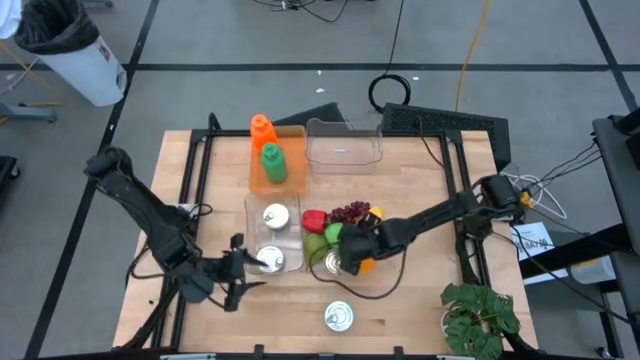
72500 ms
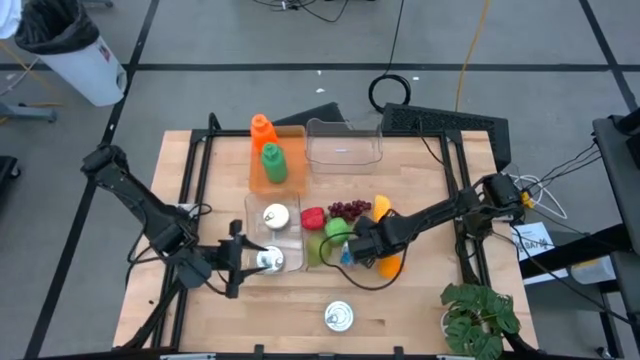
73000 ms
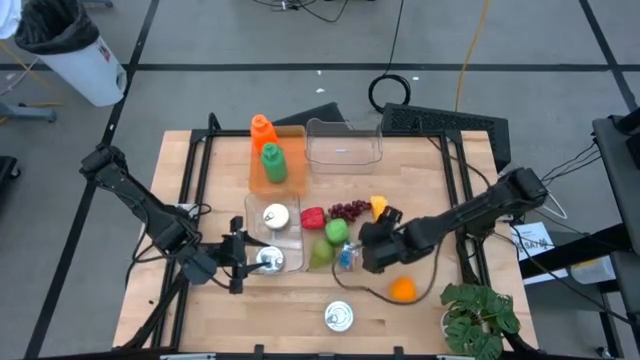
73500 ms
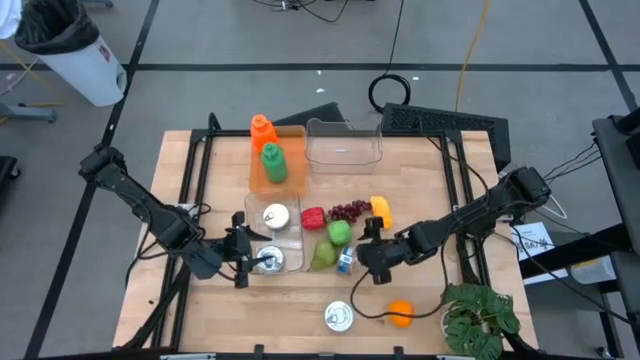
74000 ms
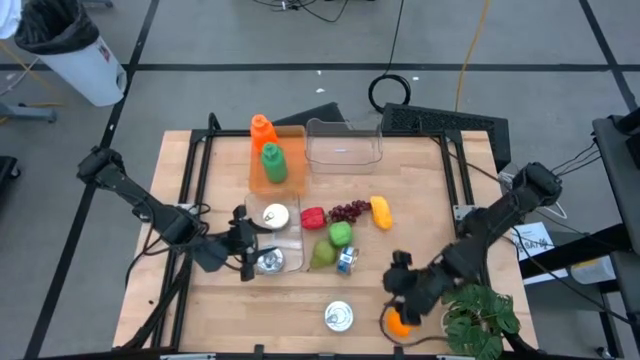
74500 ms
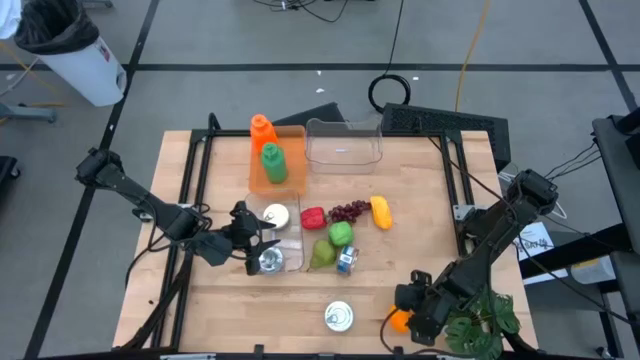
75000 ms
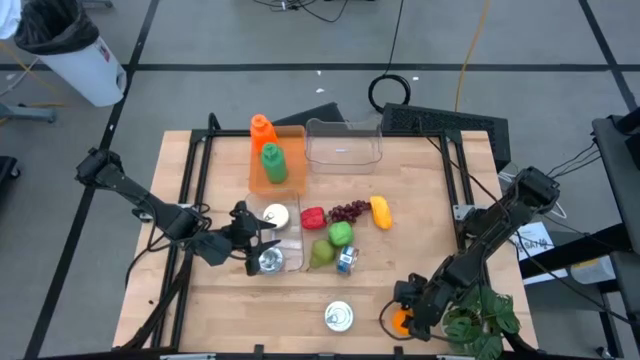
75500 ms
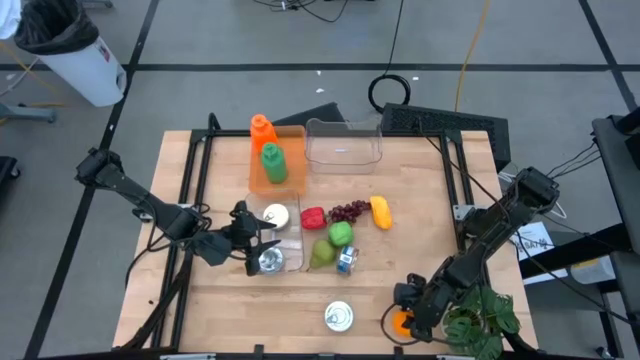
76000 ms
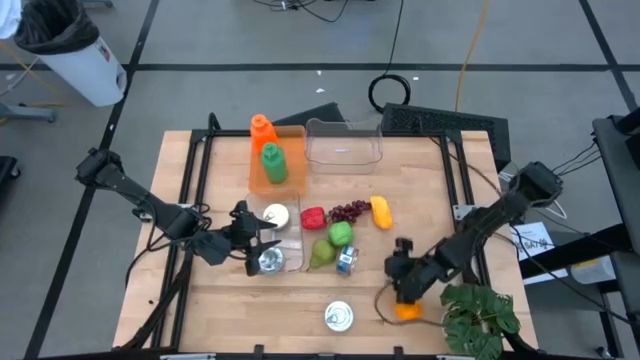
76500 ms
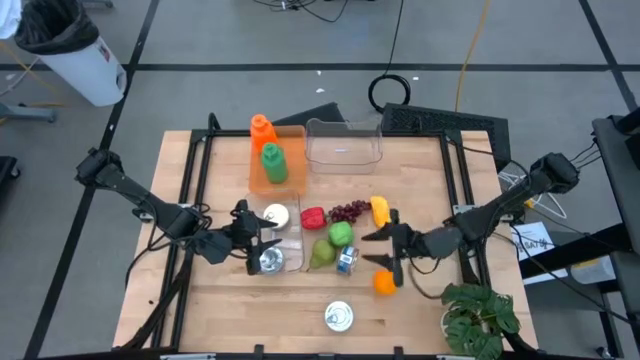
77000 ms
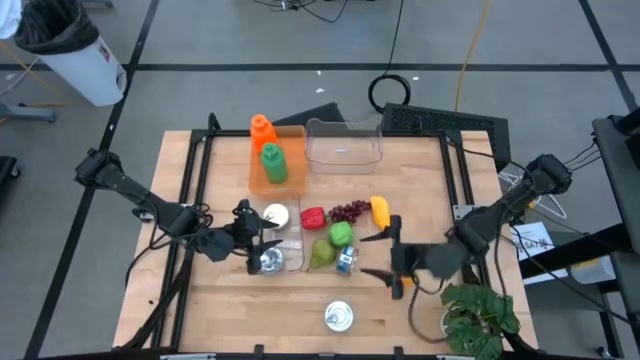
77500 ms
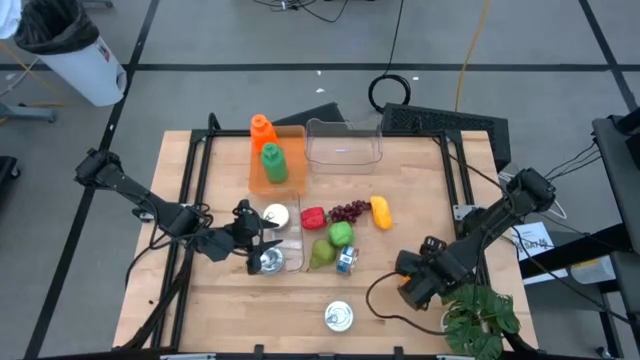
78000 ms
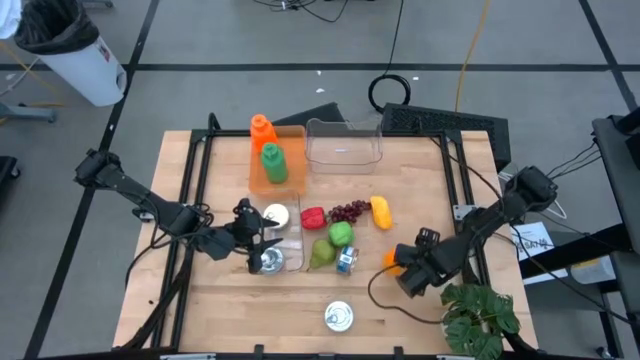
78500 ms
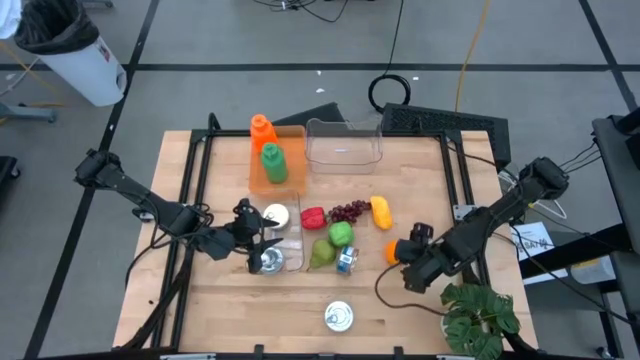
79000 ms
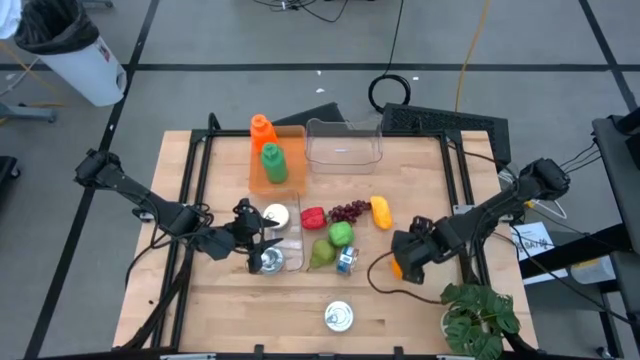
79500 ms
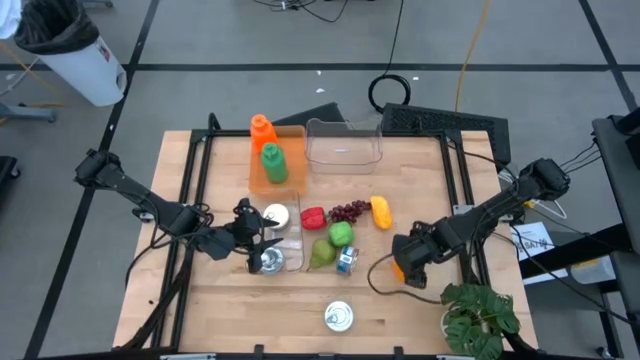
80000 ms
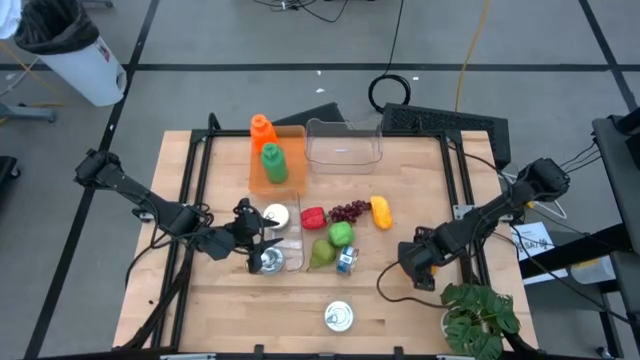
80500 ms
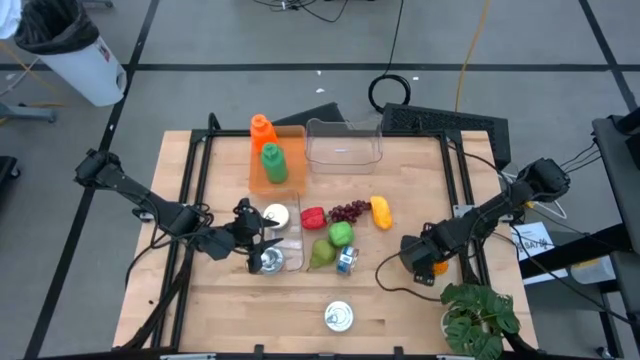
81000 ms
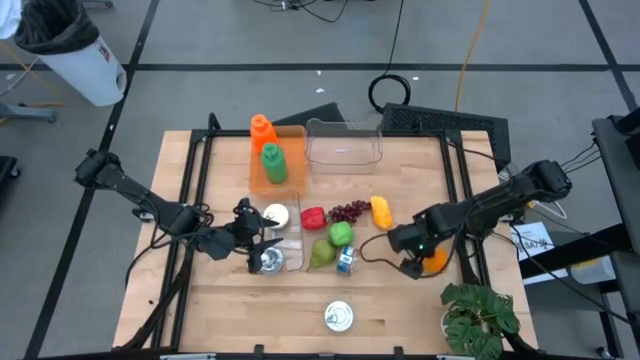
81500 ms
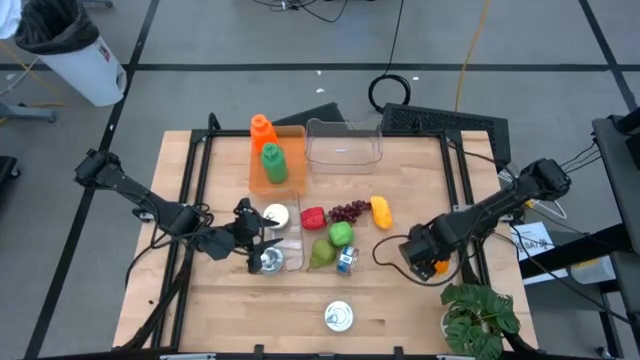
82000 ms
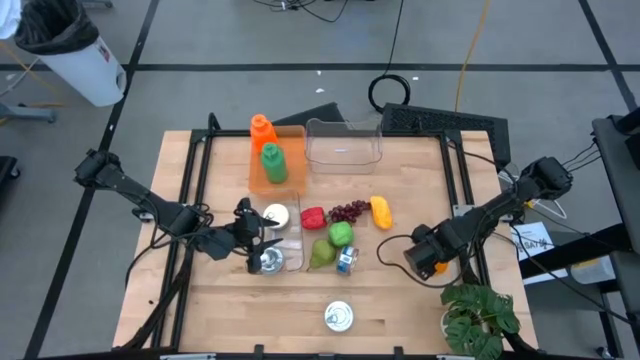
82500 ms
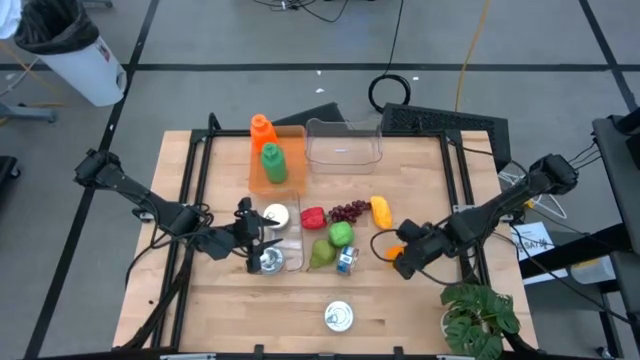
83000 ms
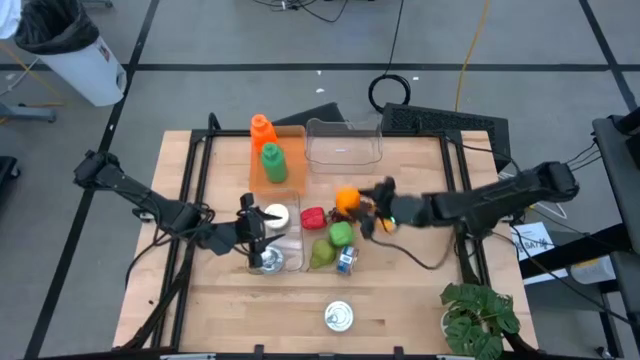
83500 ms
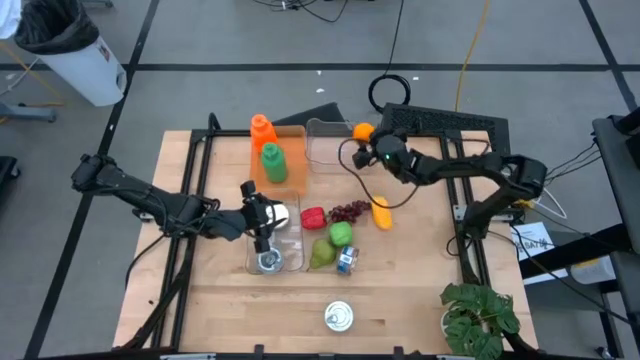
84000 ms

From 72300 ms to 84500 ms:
Task: Pick & Place Food Item
Put the orange into the top transparent bin

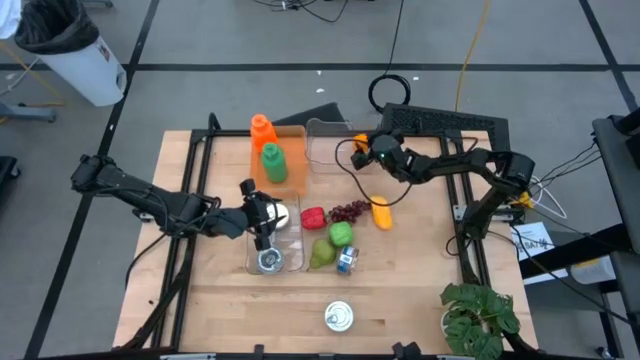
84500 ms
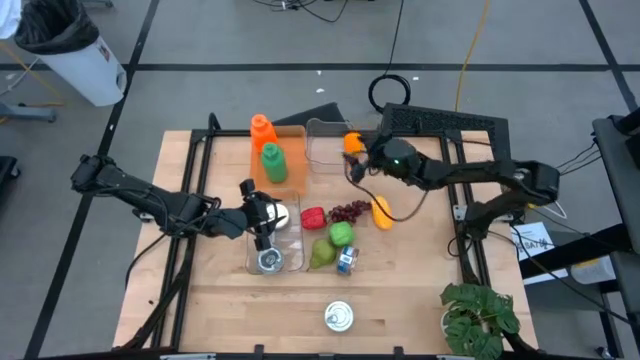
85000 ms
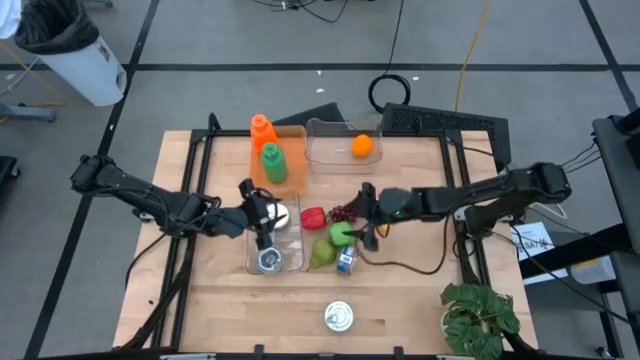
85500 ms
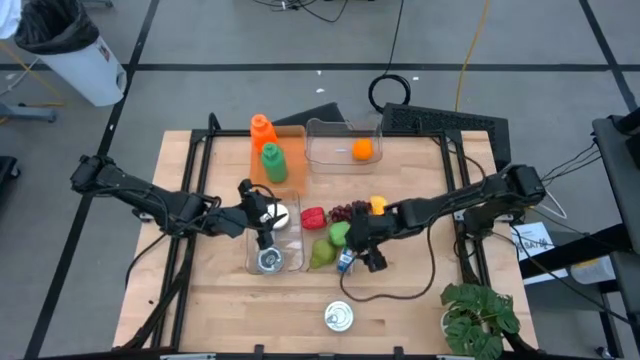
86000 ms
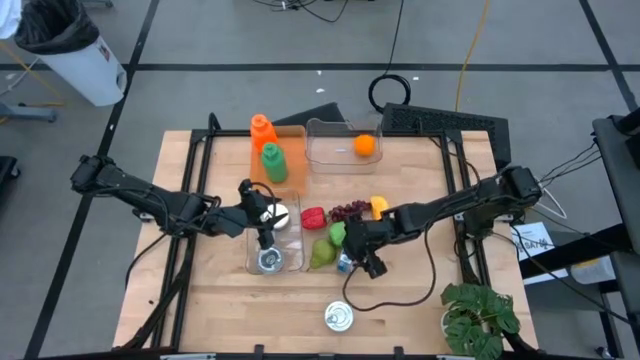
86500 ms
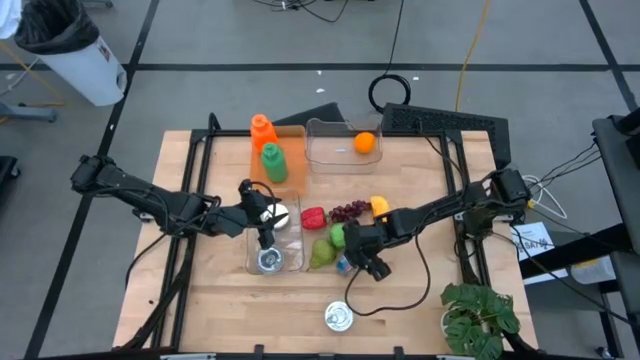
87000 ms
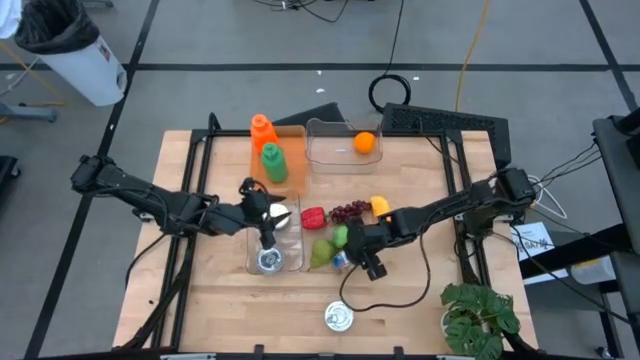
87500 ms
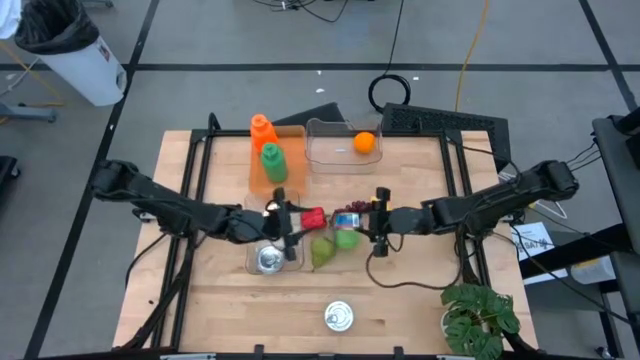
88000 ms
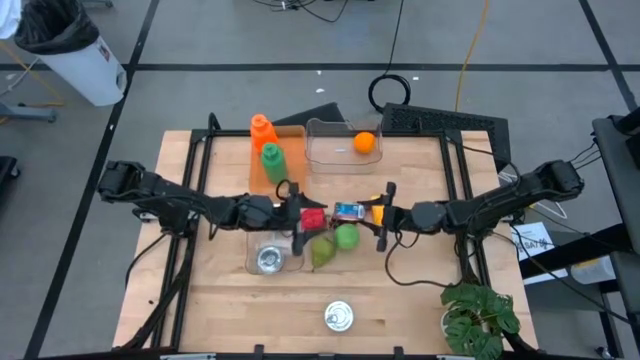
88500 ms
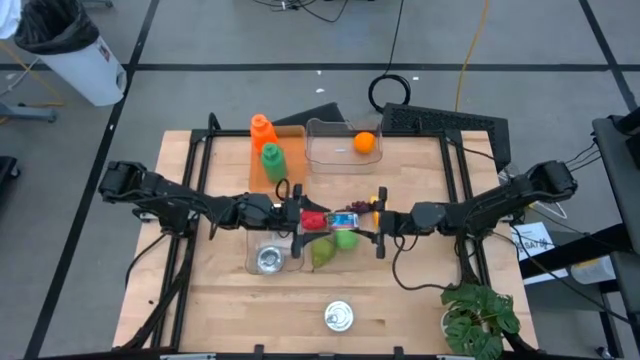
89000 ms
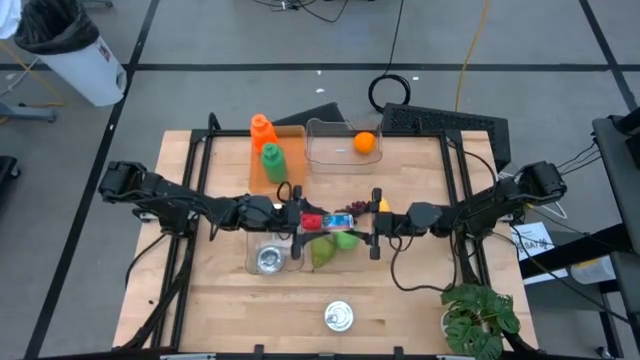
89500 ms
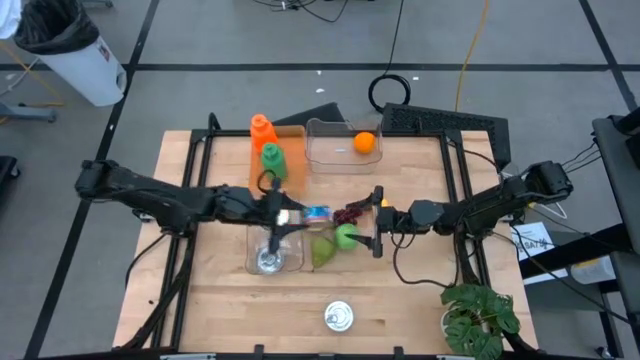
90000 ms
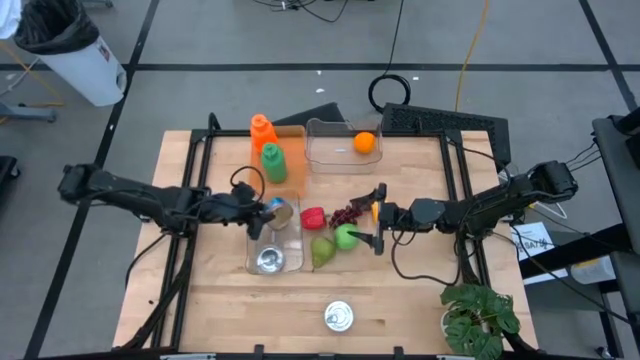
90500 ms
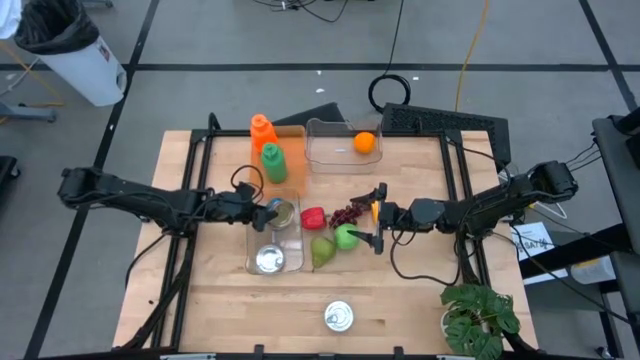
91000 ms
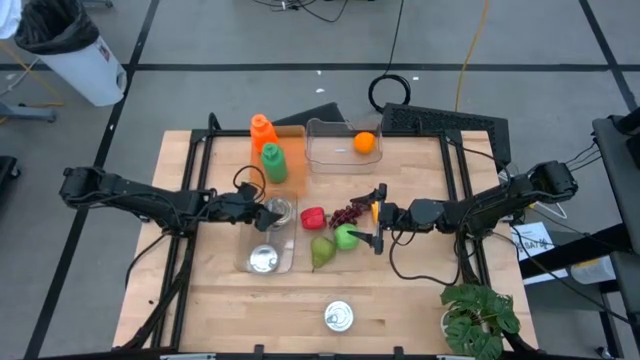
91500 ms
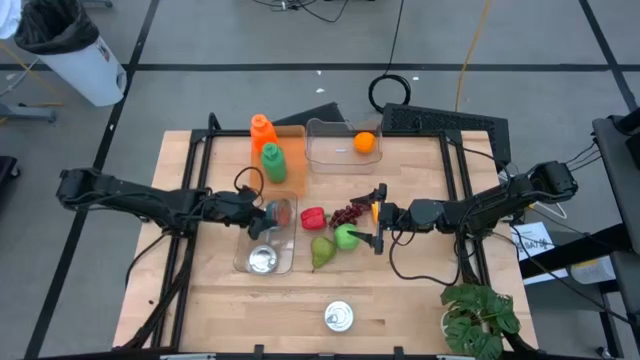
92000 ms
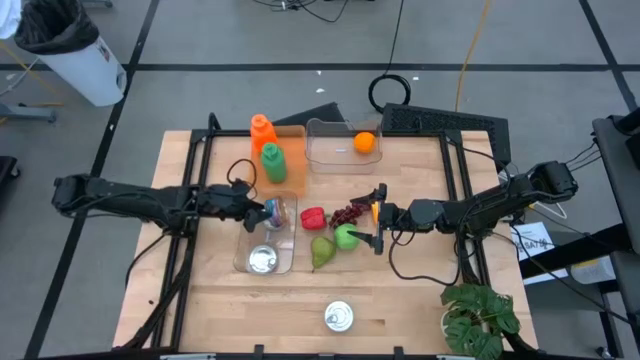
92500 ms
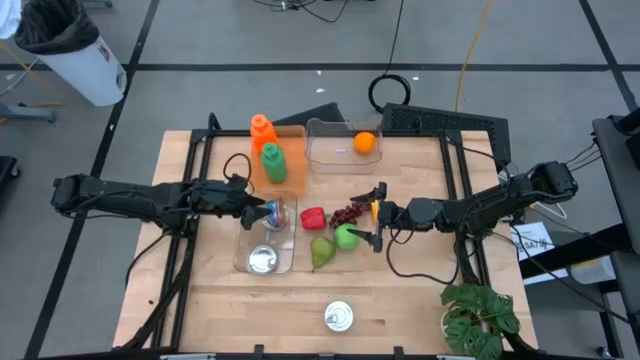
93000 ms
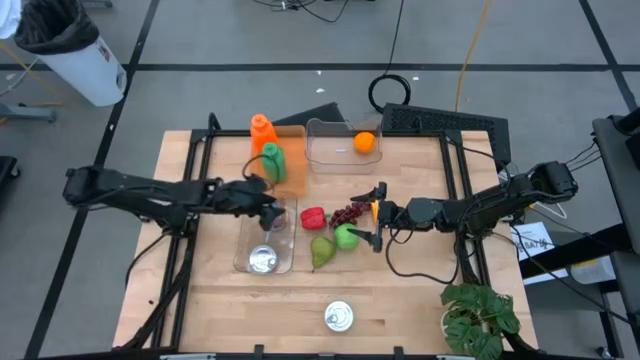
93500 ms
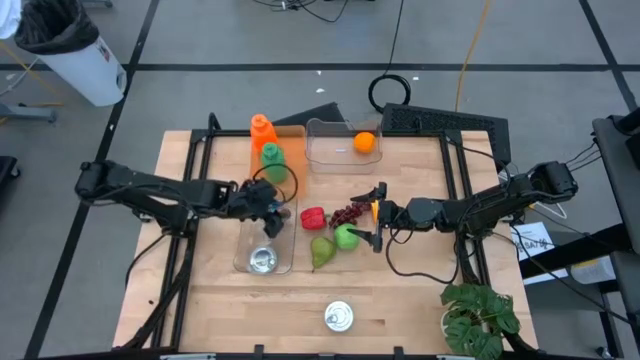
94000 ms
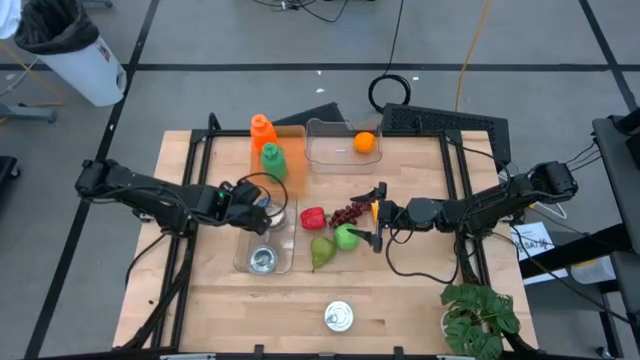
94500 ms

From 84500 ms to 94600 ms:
Put the blue and pink tuna can into the bottom transparent bin
